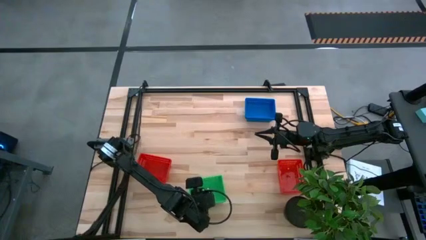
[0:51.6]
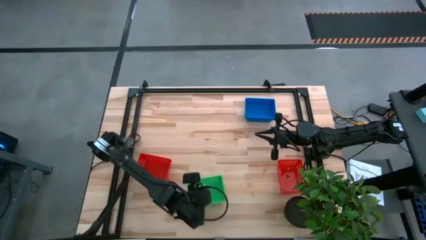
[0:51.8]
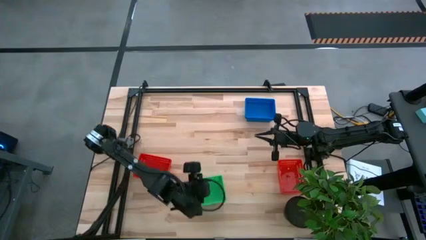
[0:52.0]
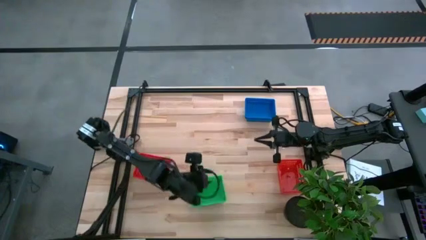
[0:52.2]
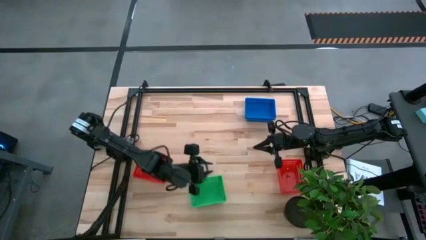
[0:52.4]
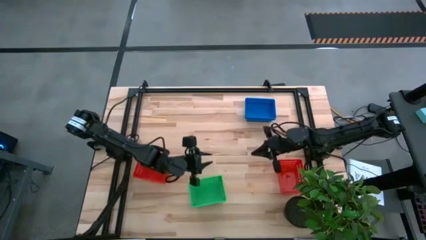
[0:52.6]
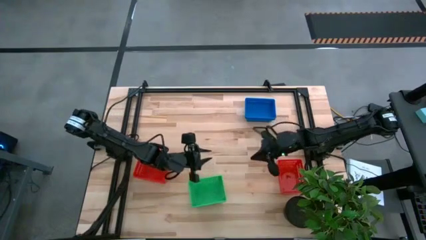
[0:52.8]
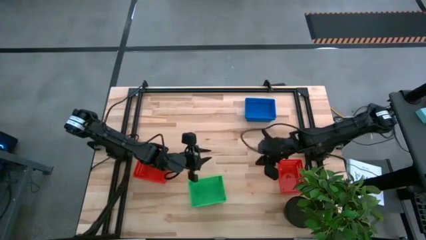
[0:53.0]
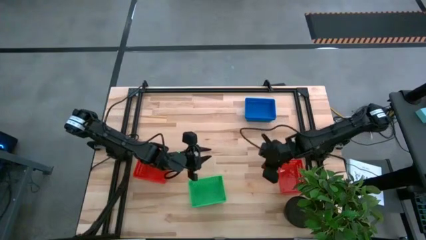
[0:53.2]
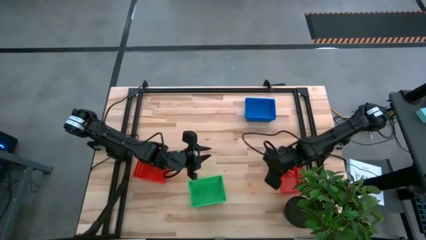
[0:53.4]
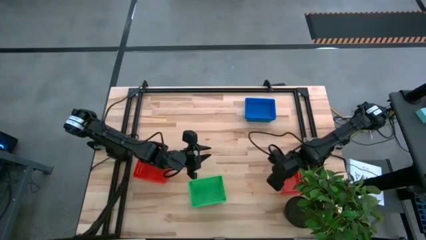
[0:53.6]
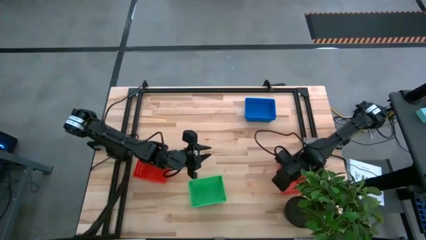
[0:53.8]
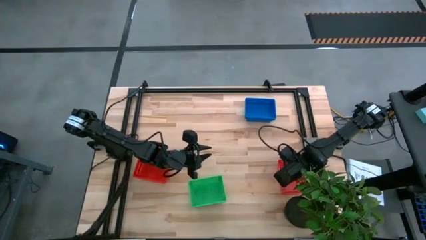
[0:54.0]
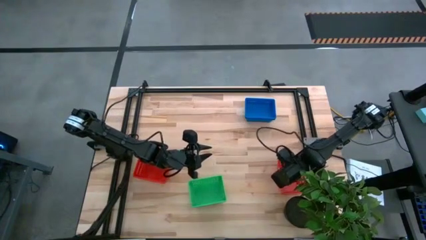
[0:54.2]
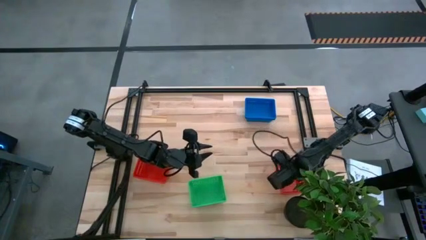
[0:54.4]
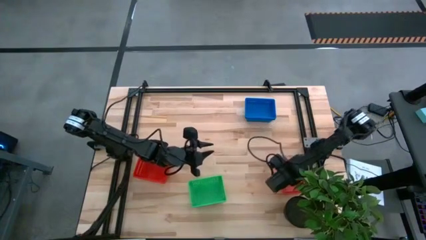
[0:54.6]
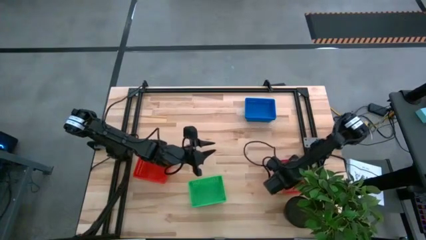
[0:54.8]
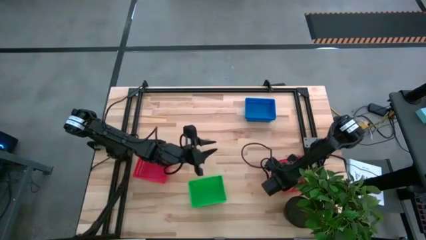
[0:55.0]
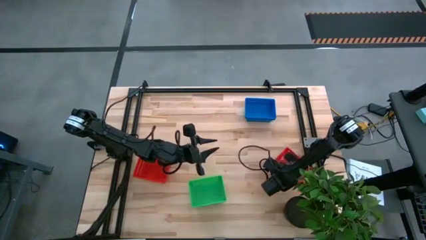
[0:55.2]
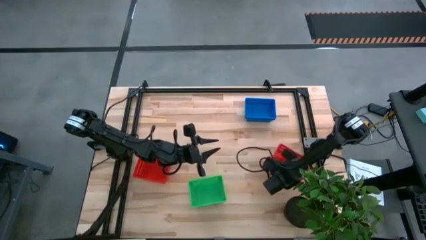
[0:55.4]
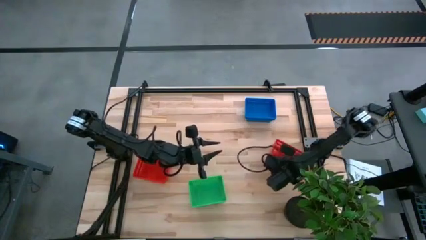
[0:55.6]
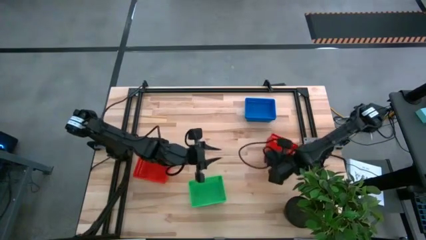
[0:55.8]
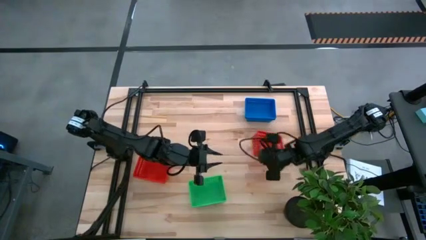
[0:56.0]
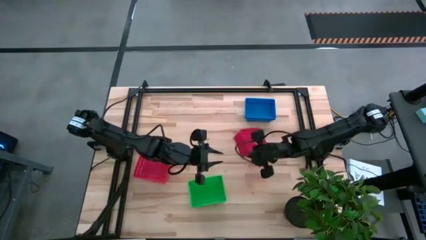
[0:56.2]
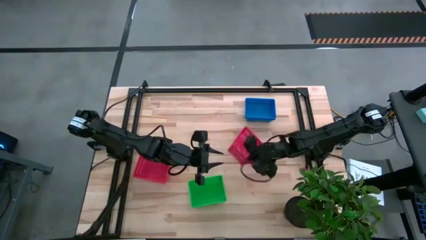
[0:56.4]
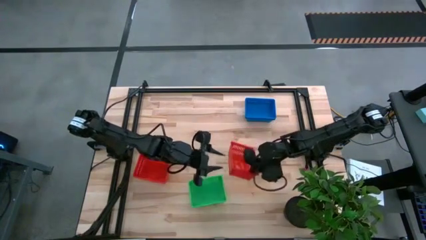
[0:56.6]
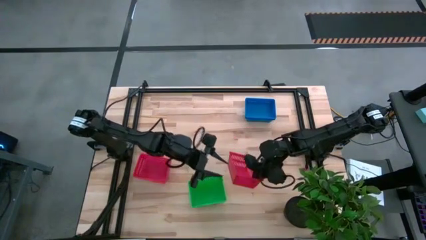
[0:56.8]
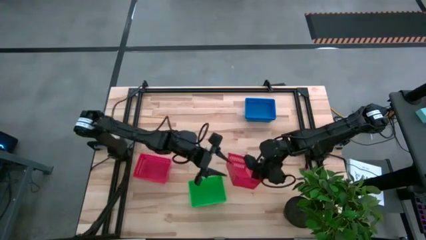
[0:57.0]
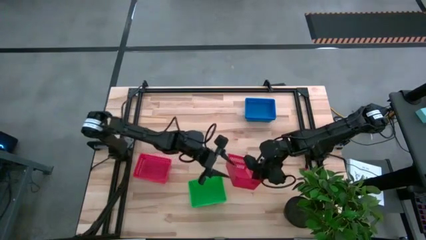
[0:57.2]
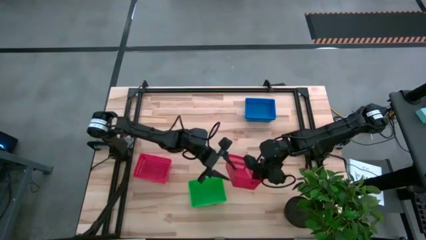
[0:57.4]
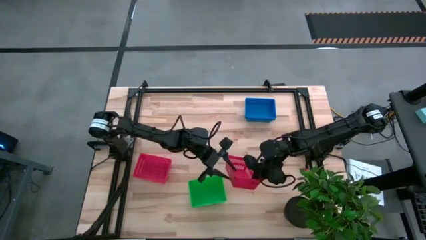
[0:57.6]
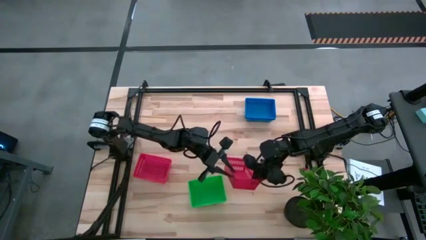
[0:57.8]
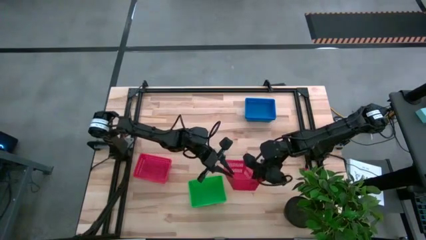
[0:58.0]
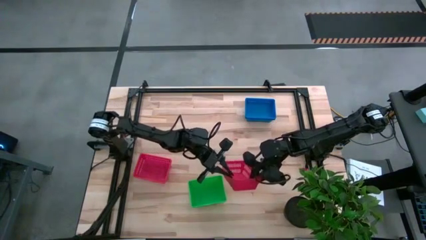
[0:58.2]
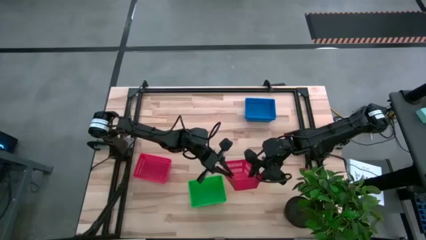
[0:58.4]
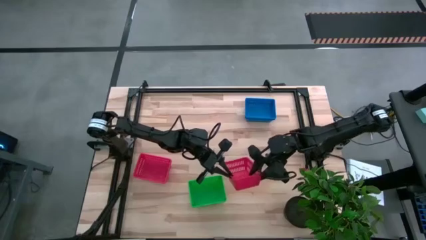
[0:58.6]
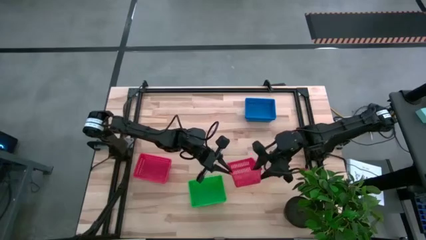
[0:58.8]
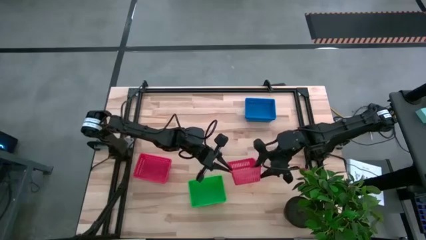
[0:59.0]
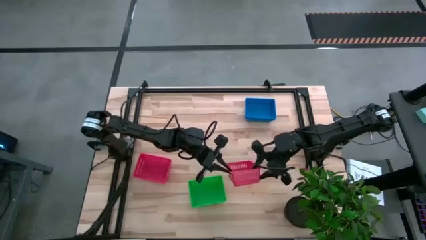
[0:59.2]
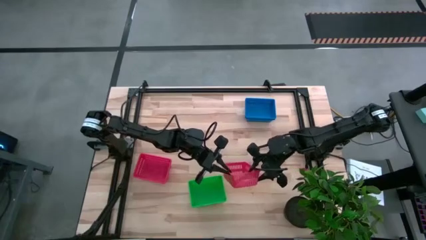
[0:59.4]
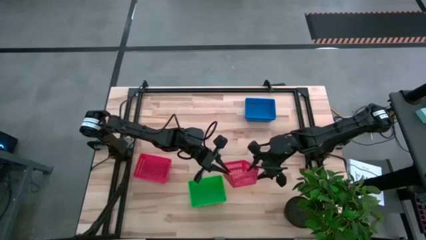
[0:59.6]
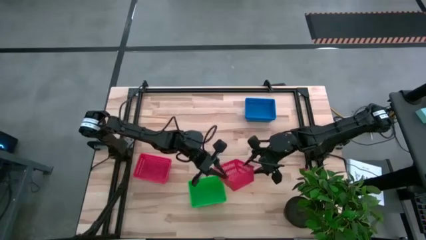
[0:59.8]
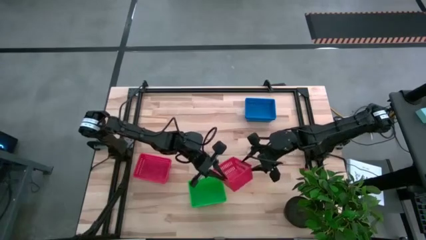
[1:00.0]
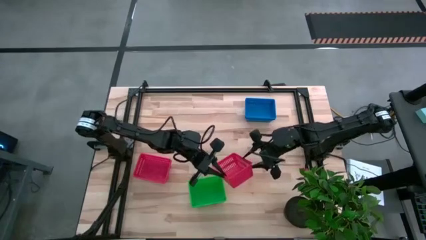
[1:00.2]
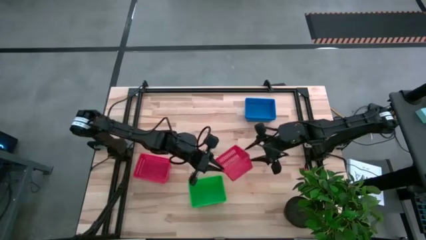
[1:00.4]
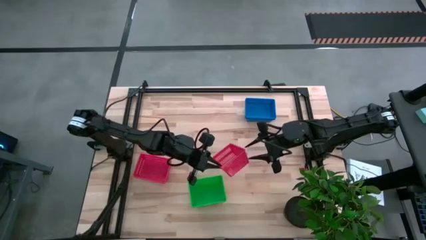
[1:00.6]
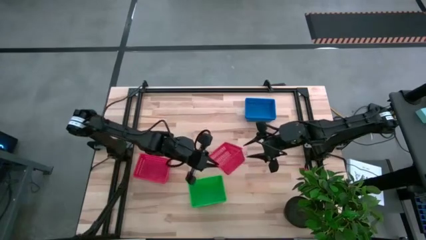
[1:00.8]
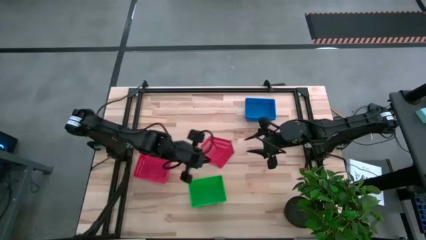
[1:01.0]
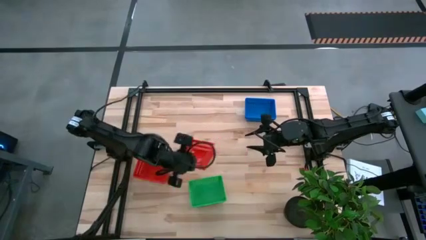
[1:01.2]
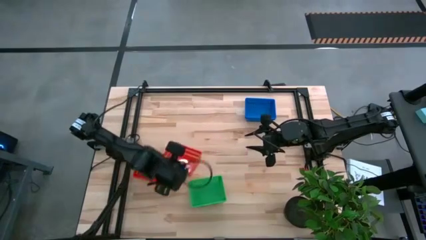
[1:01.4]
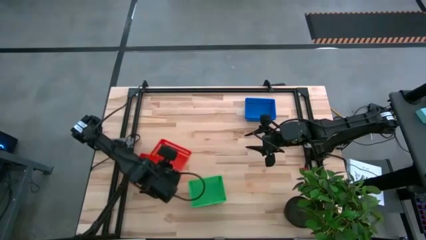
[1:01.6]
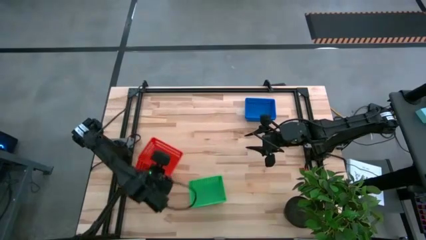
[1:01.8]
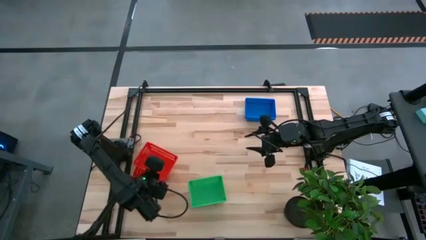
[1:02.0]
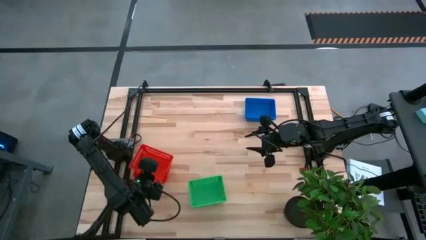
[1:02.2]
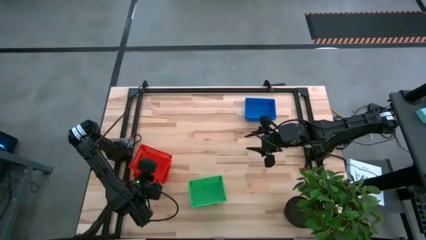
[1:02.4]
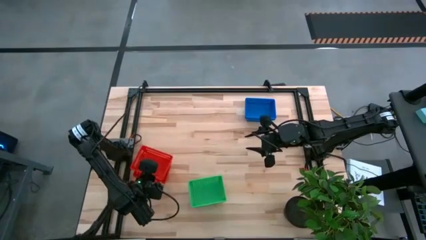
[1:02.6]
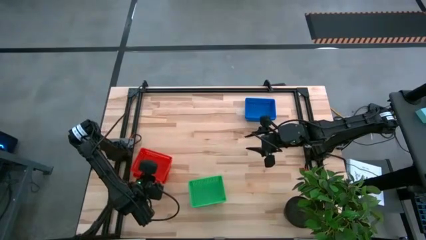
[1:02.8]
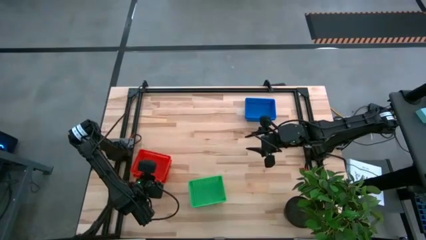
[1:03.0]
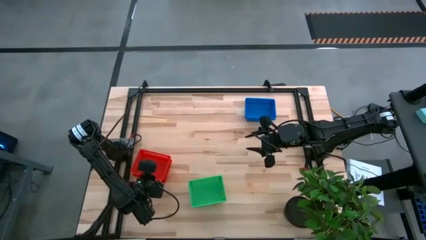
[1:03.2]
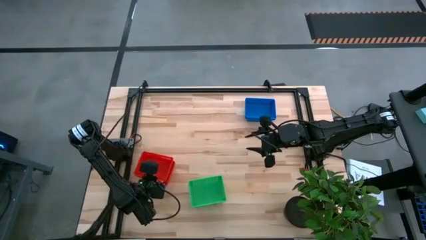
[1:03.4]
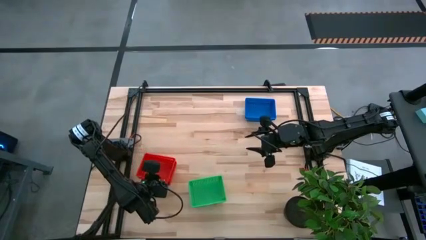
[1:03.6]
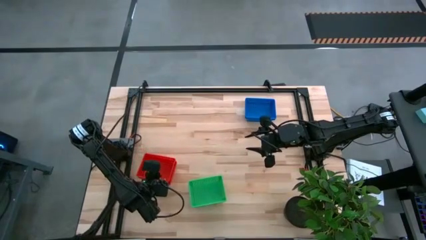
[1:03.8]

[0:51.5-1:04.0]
Stack the right red bin on top of the stacked red bins

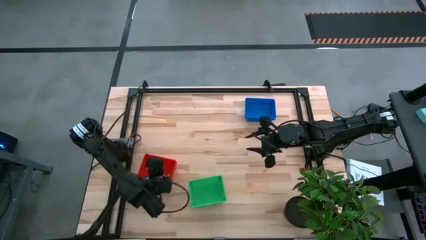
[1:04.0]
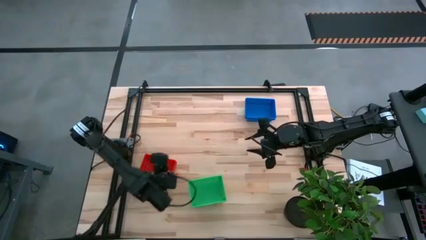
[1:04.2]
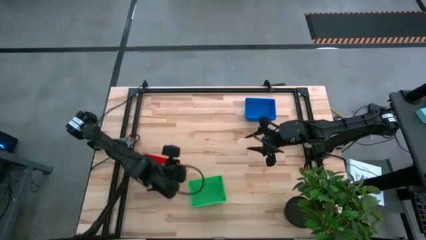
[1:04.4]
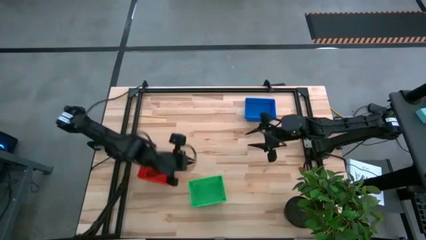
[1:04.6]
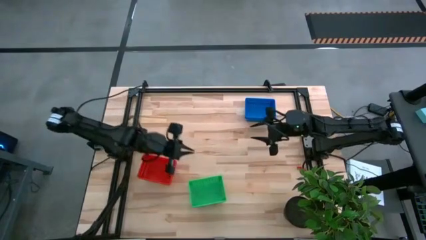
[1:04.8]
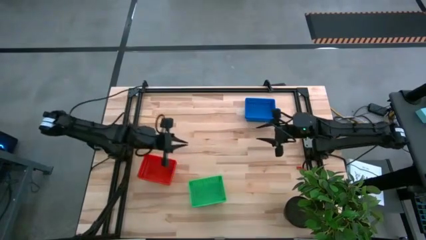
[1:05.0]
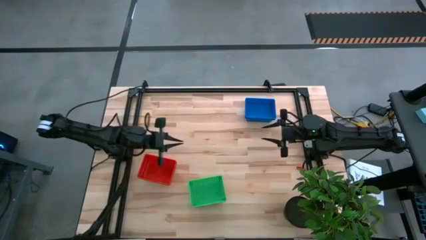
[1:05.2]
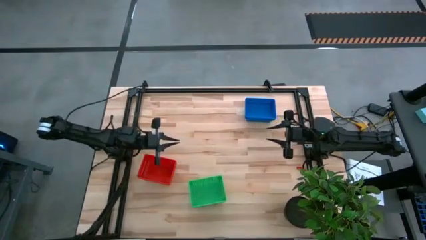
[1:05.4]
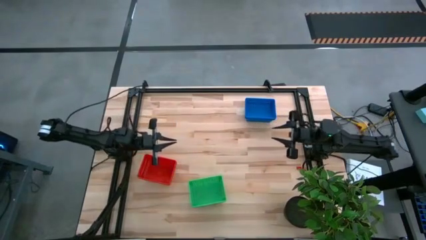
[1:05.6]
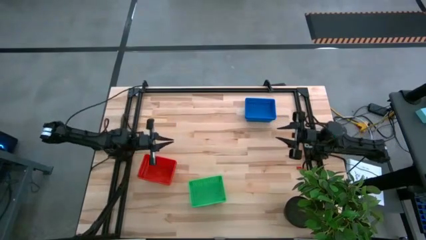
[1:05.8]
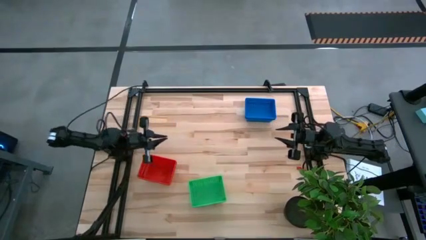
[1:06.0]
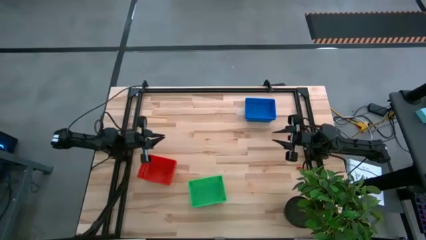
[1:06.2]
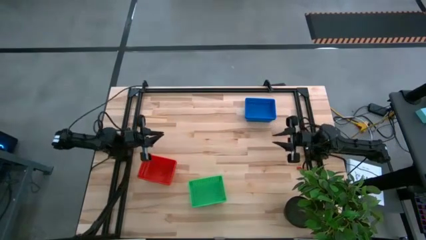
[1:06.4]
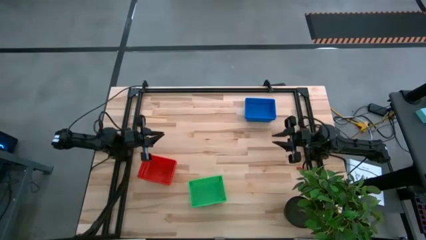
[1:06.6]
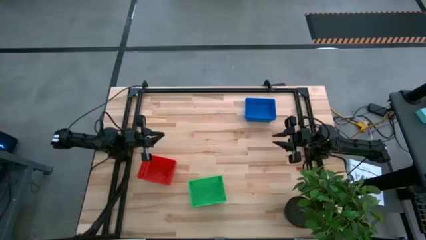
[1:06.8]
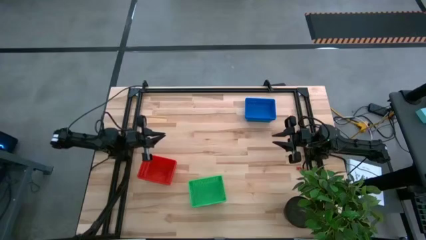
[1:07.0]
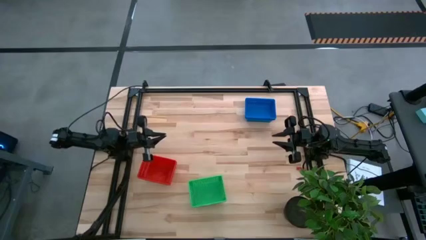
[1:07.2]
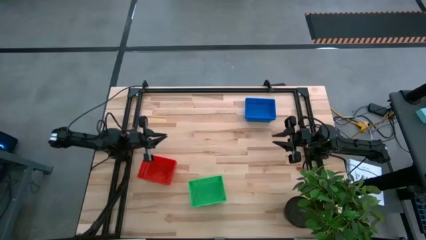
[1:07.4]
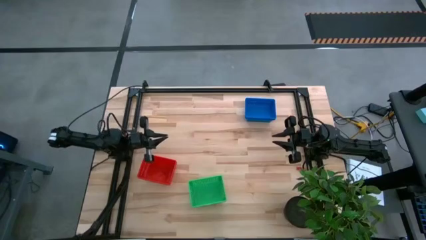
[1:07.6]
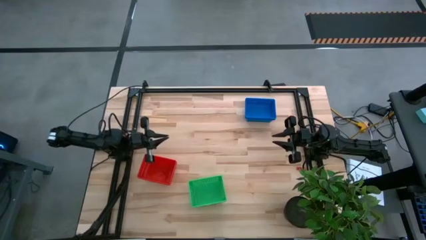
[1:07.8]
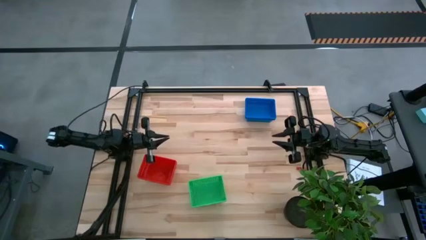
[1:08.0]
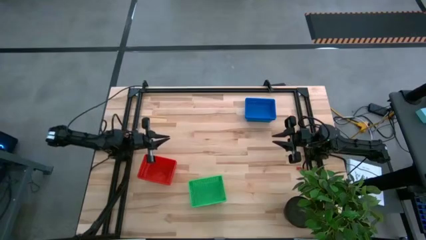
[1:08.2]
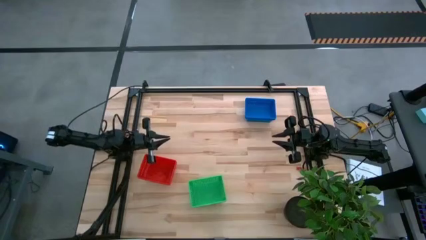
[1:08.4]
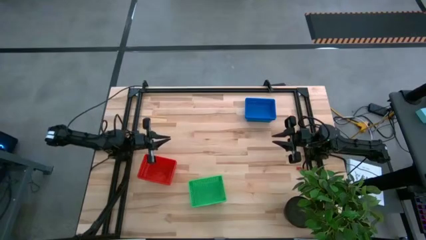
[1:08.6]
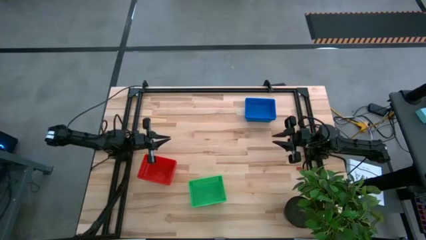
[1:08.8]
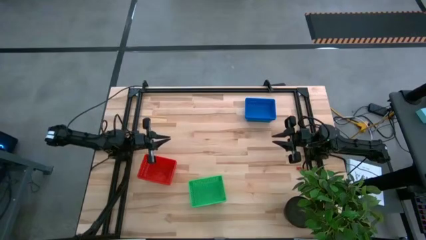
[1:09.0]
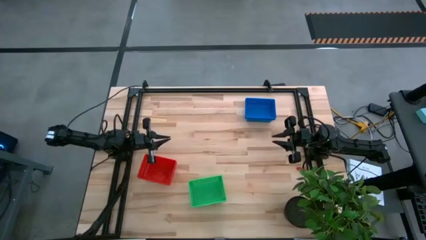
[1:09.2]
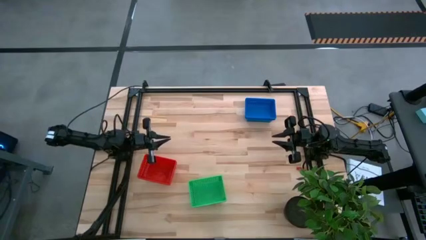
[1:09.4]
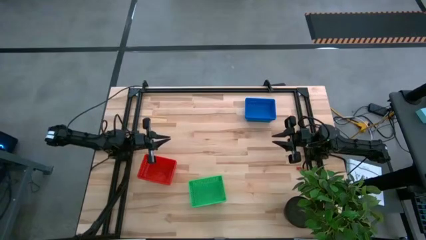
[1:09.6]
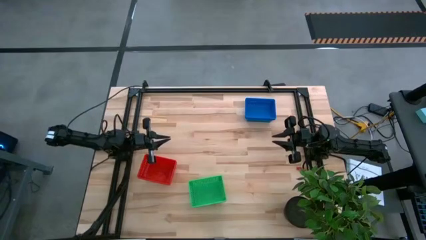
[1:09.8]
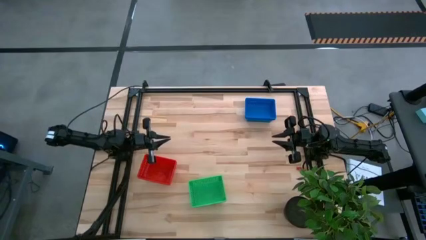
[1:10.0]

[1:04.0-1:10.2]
Return to Home Position
